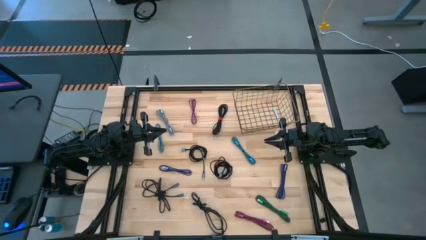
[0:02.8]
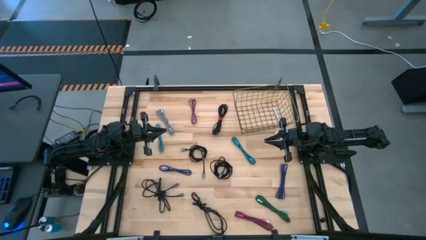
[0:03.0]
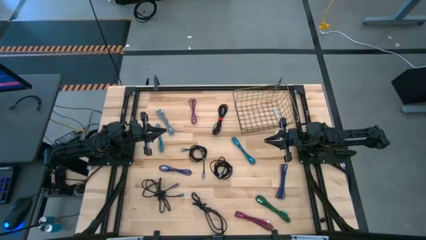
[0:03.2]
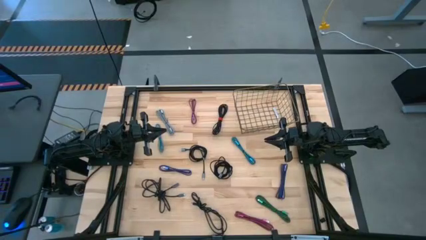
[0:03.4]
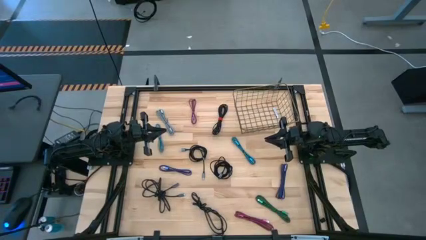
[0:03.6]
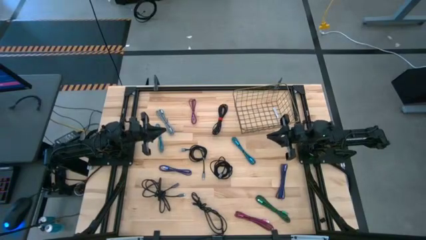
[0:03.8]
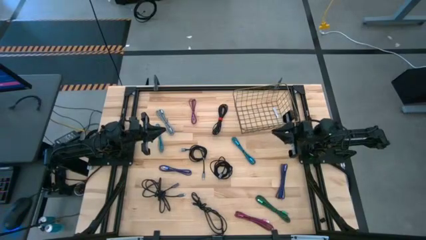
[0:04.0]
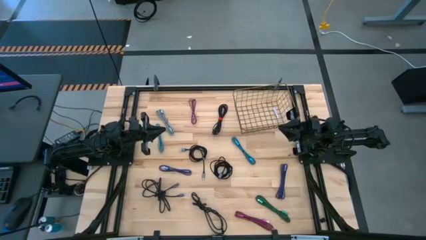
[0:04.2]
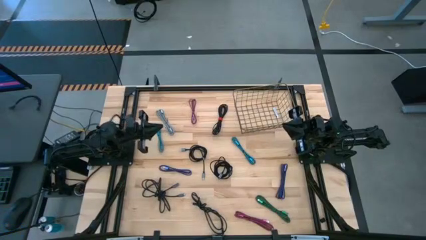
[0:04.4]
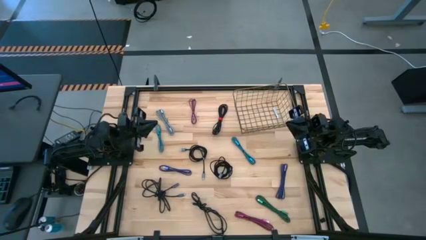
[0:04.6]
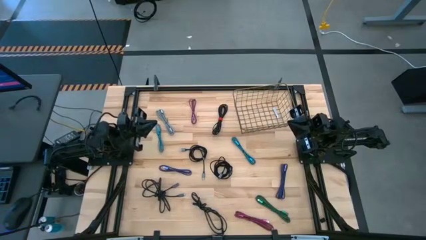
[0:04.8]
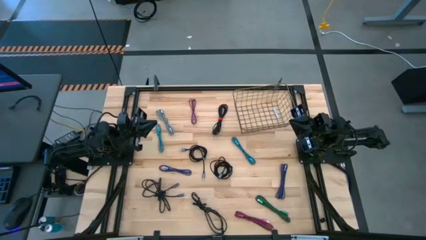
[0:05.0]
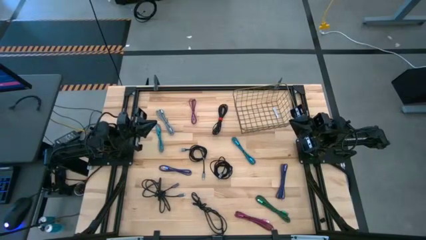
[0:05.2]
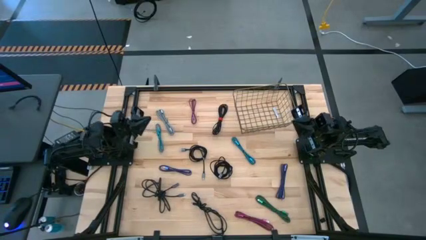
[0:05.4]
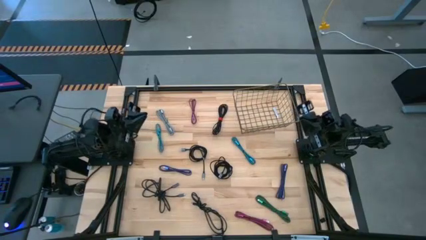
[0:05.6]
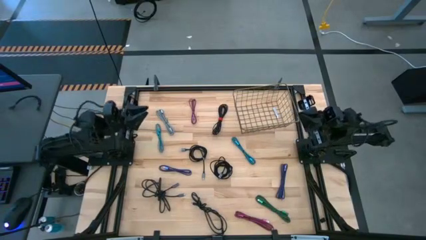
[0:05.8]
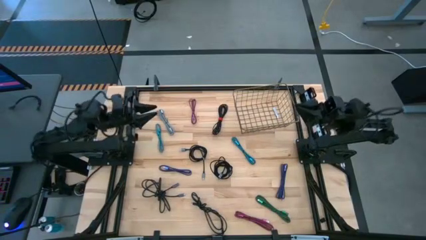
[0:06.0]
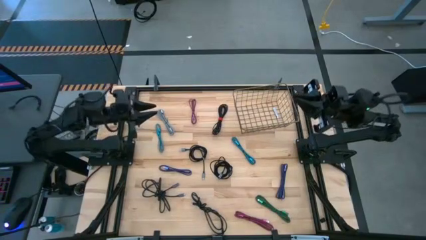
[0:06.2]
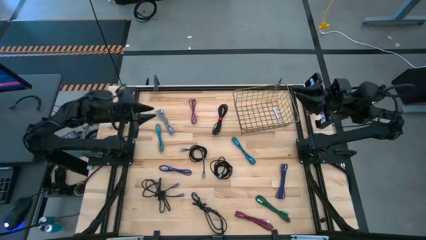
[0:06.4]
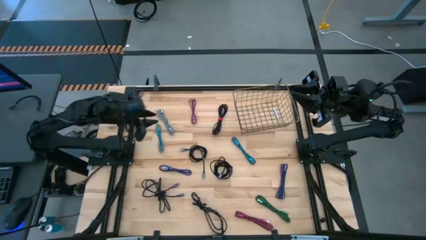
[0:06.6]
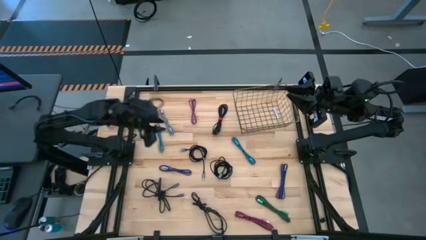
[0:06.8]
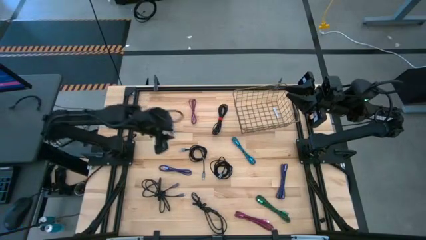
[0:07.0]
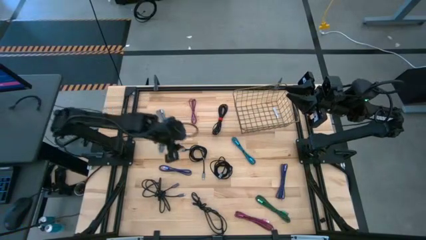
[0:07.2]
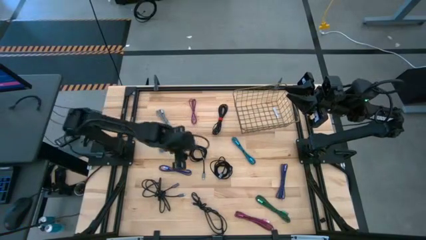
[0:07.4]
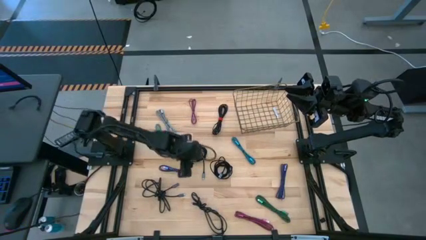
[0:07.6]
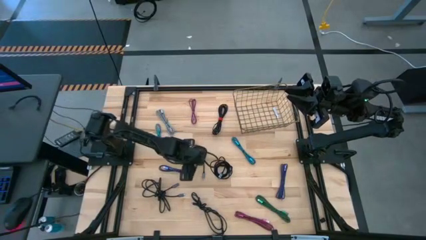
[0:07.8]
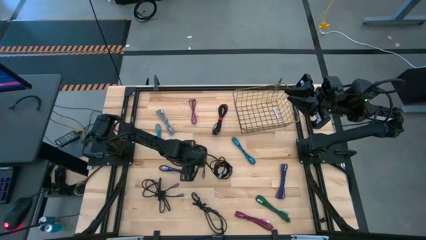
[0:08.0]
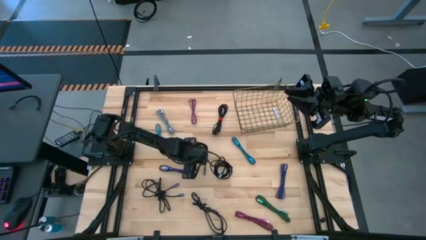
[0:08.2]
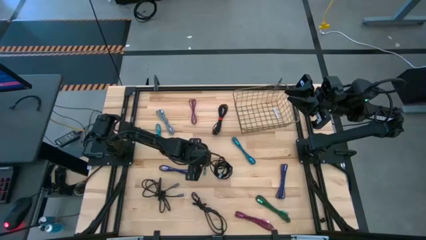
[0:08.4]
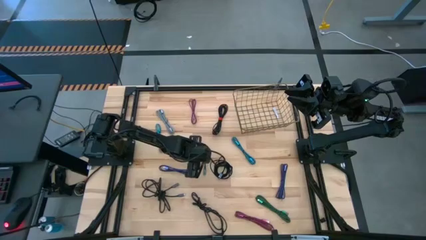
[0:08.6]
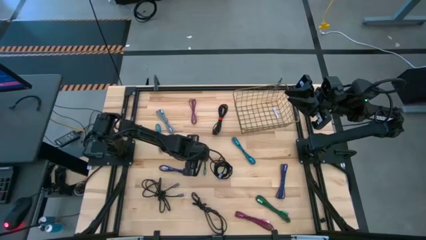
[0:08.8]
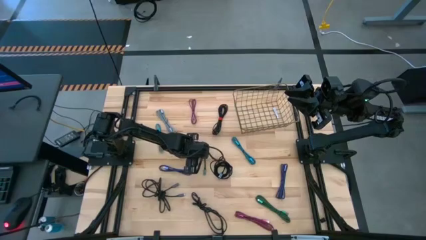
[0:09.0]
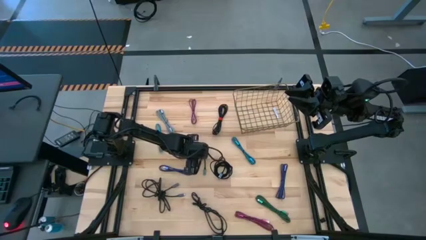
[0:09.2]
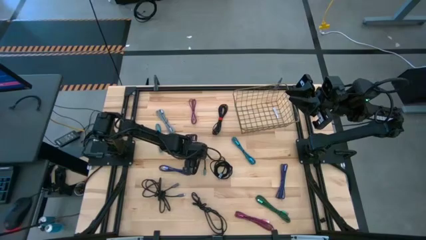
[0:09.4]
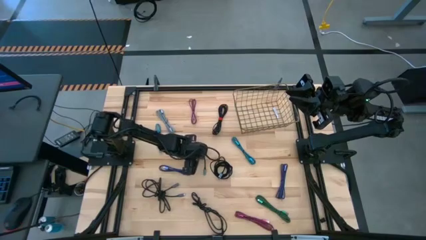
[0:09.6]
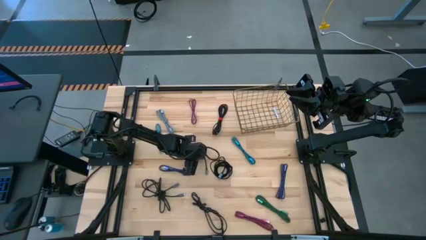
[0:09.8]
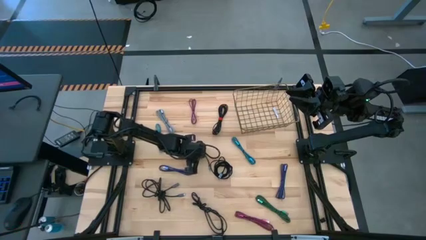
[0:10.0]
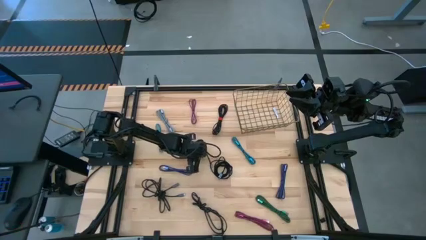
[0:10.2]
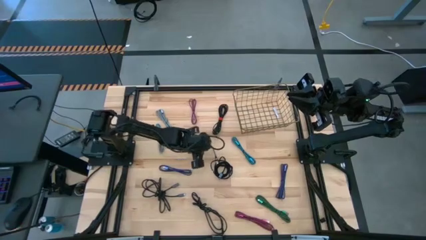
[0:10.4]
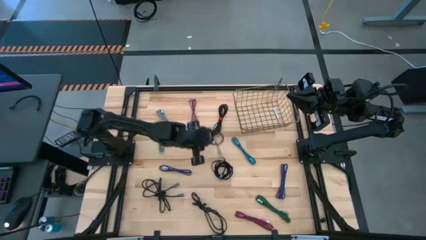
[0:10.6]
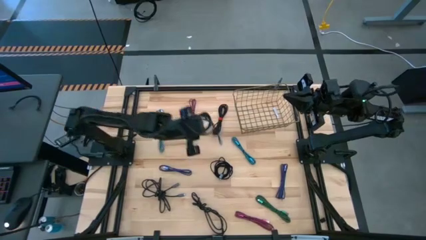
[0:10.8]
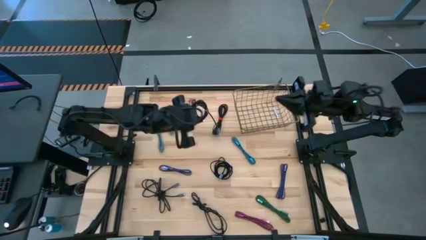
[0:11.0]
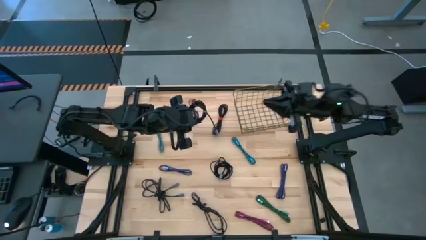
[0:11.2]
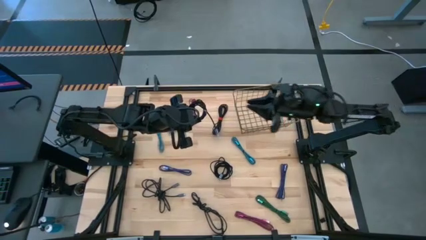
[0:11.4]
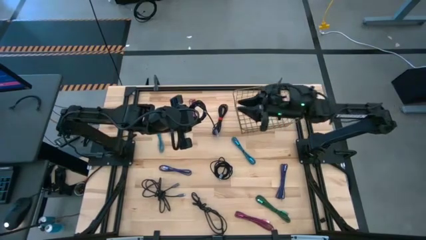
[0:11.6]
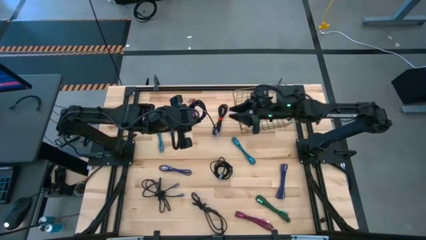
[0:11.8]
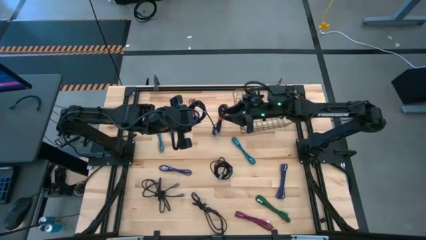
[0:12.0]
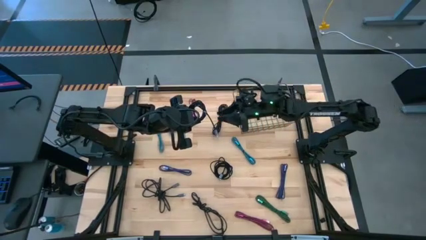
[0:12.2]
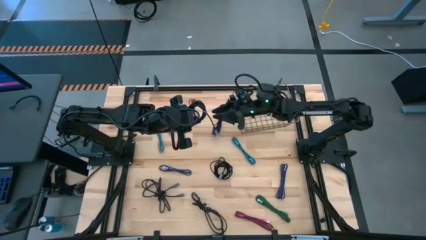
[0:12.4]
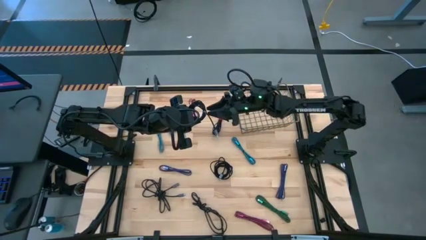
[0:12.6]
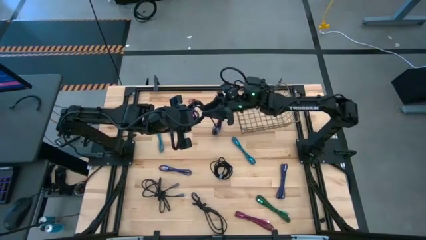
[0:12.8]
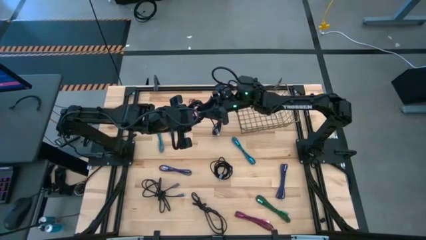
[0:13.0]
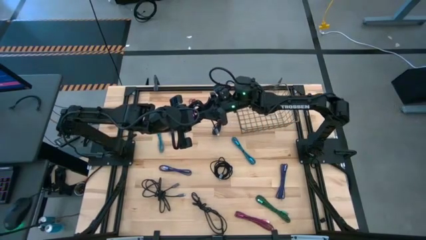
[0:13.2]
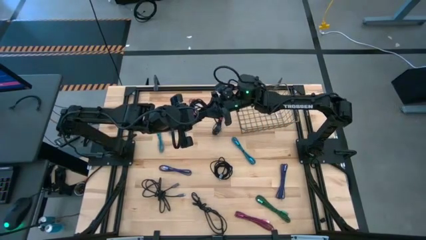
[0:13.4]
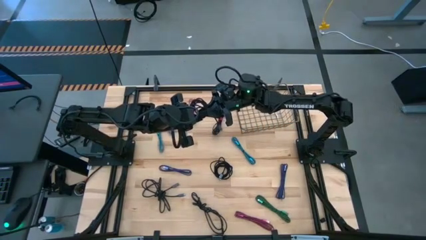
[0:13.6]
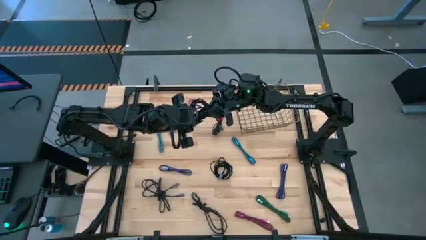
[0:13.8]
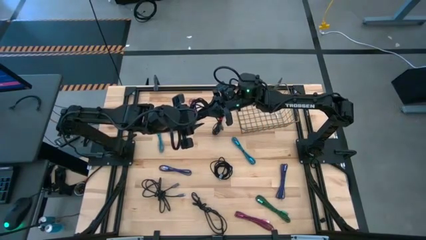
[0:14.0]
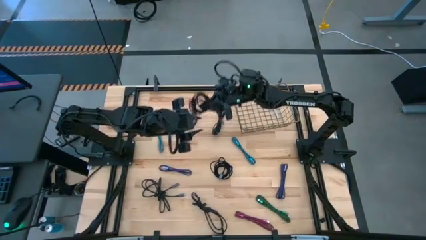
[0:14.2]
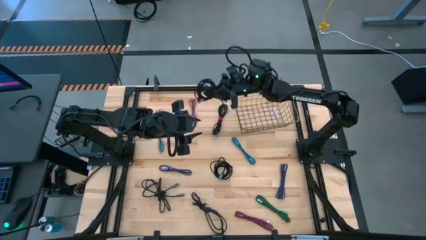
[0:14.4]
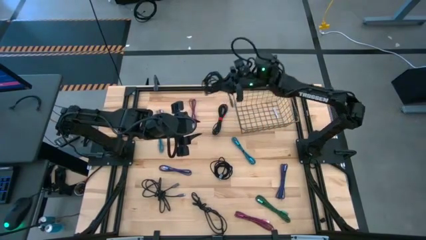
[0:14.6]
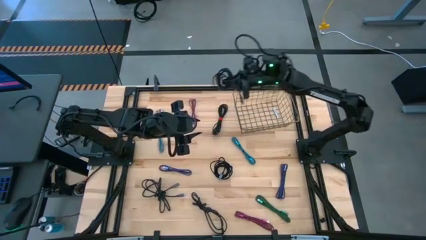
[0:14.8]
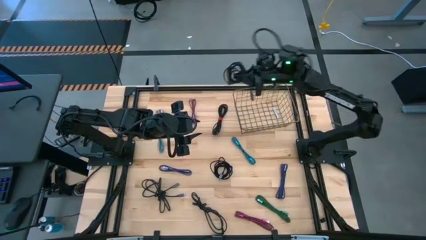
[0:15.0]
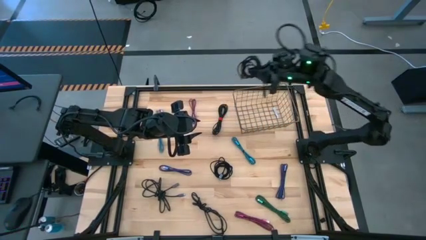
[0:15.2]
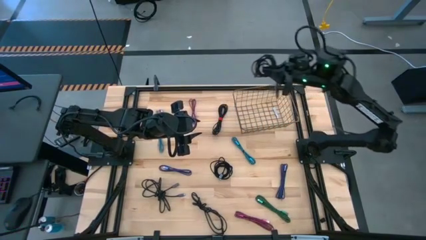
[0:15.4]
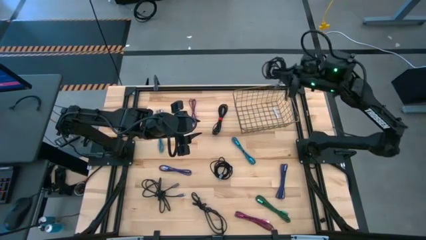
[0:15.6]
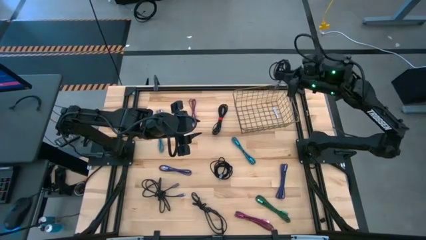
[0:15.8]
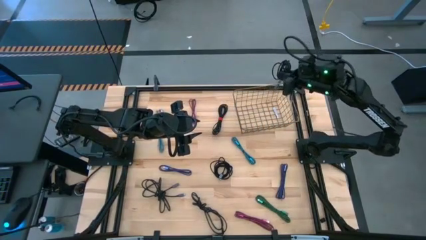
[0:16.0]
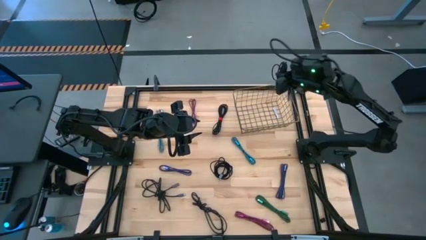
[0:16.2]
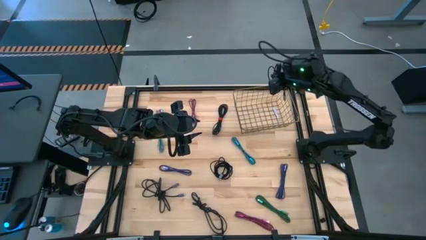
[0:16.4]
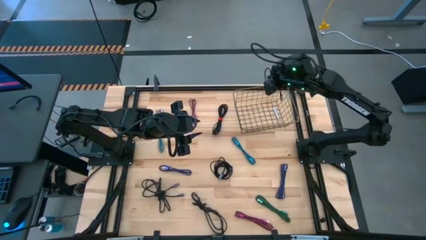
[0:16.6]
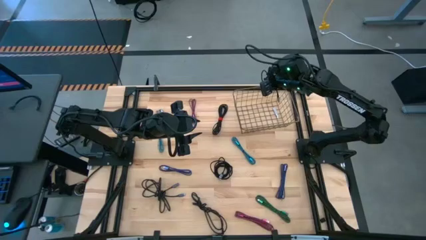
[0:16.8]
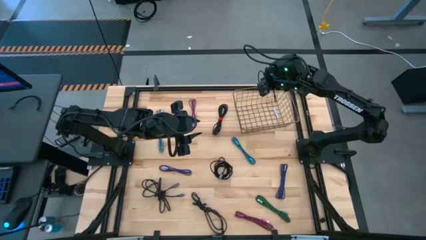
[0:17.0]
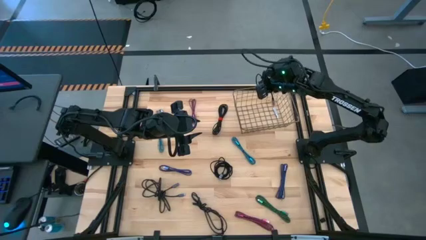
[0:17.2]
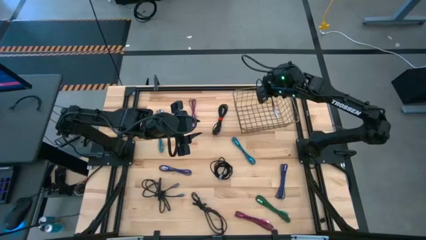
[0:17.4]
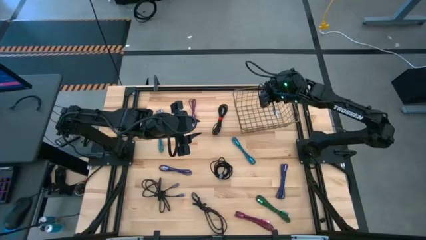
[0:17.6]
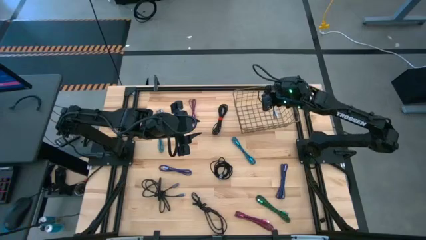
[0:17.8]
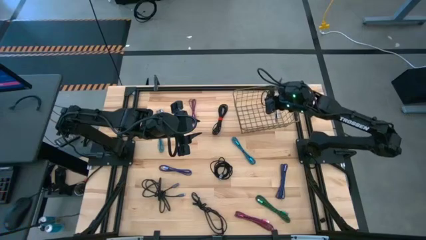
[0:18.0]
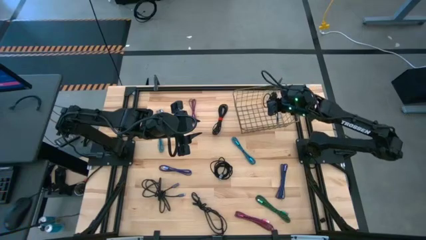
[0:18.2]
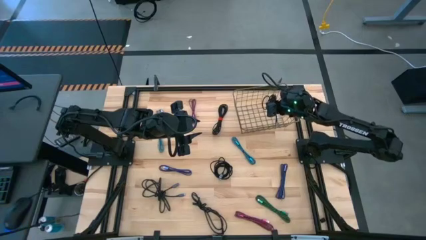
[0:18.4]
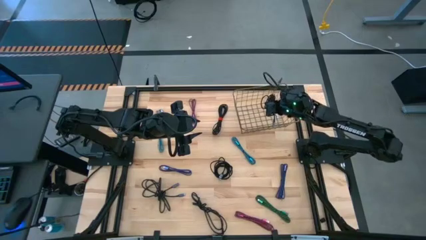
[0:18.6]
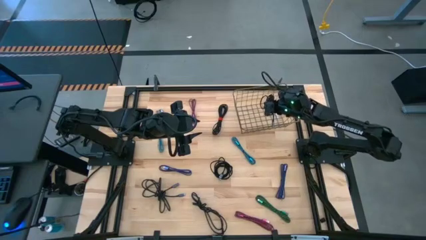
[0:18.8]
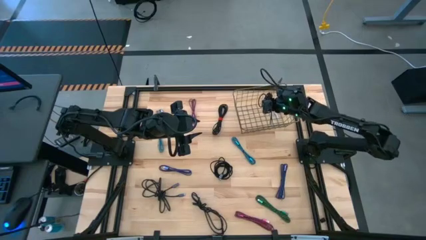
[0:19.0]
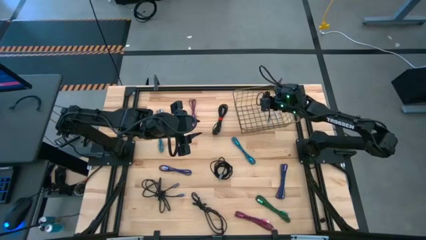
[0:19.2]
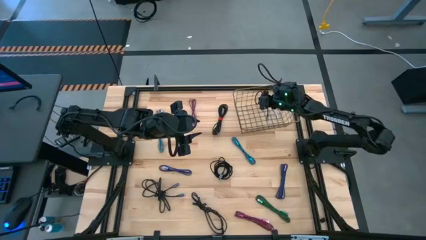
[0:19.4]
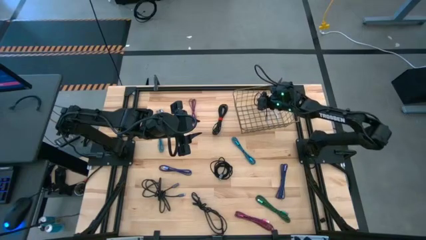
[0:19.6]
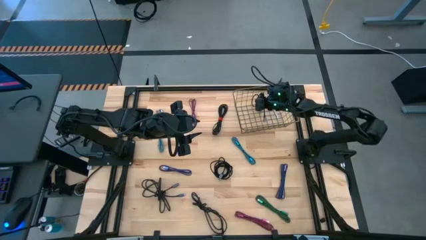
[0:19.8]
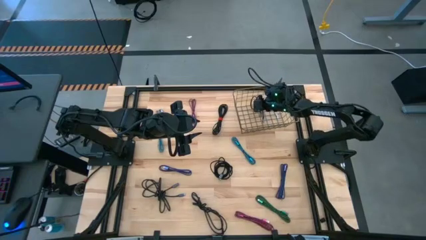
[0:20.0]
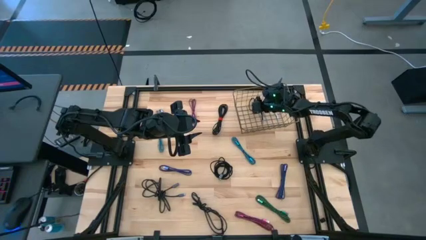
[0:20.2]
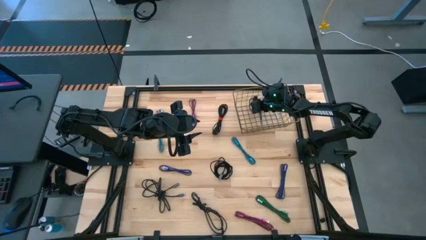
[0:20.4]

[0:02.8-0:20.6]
Task: Pick and place USB-C Cables
Put the black charger cable into the wire basket
